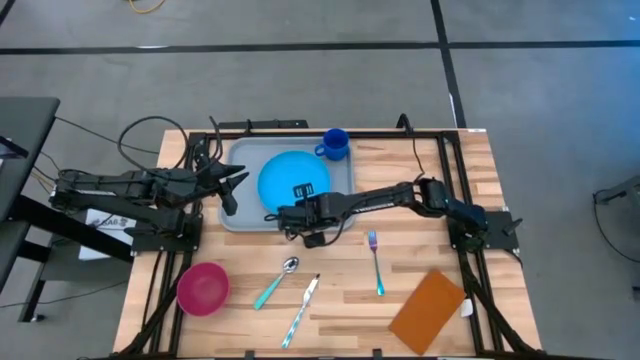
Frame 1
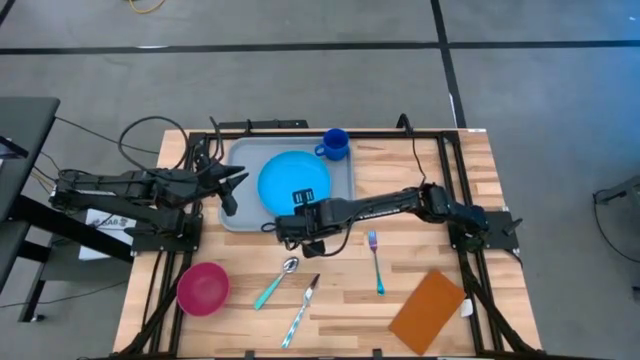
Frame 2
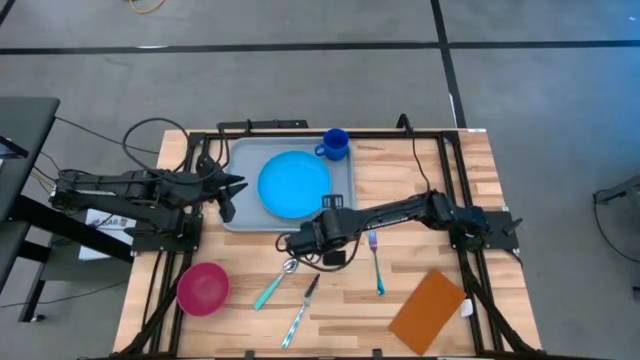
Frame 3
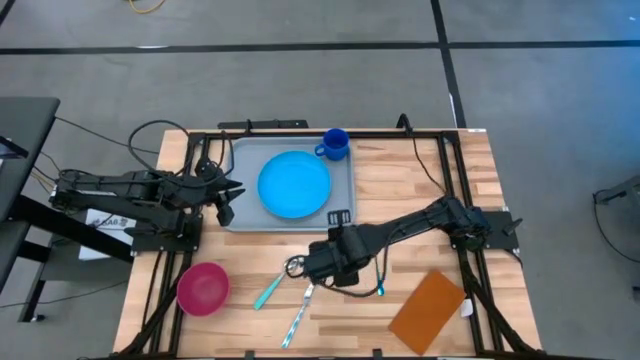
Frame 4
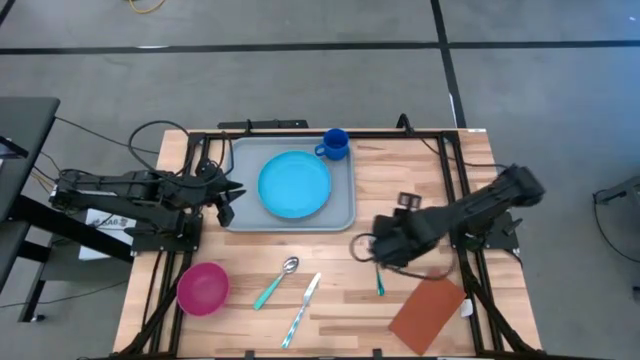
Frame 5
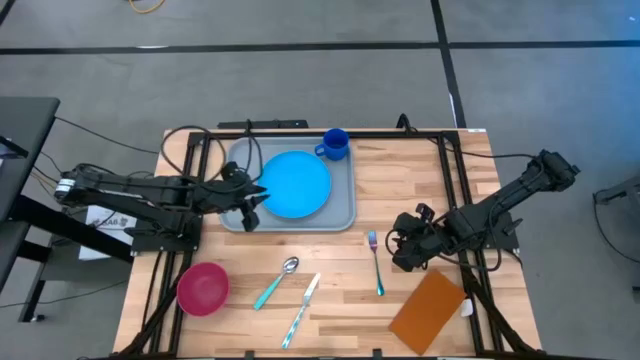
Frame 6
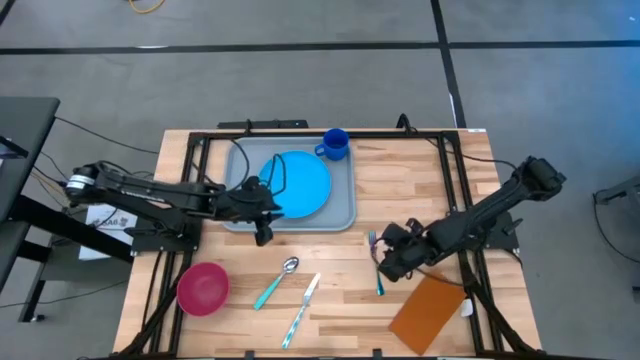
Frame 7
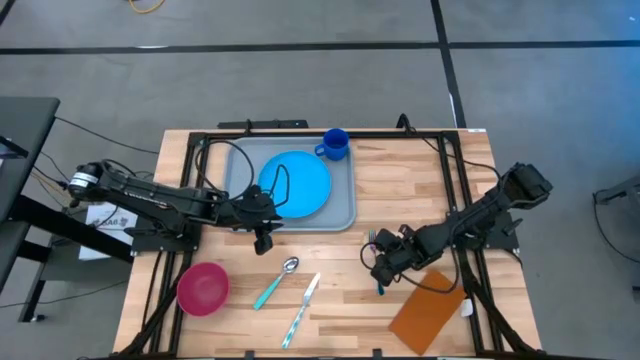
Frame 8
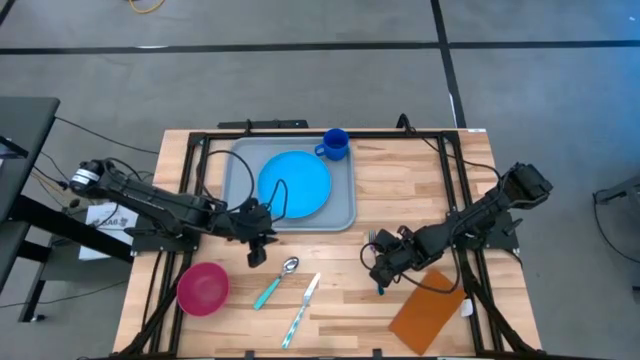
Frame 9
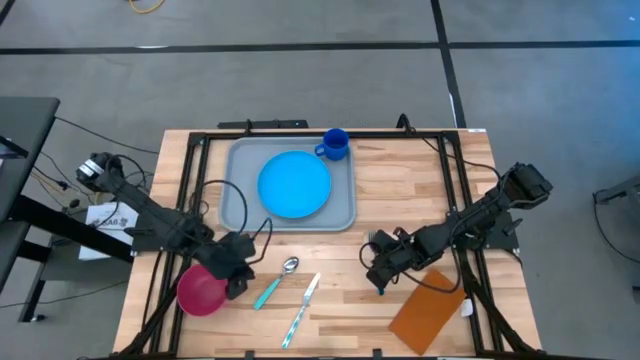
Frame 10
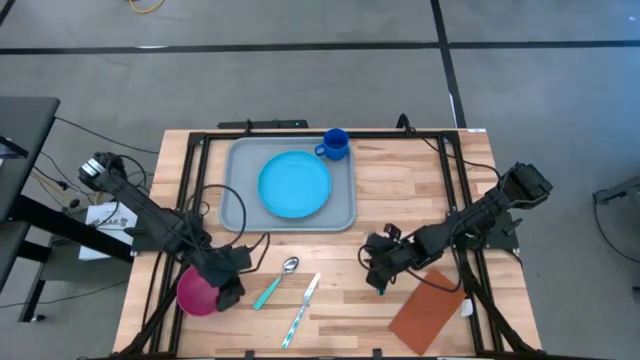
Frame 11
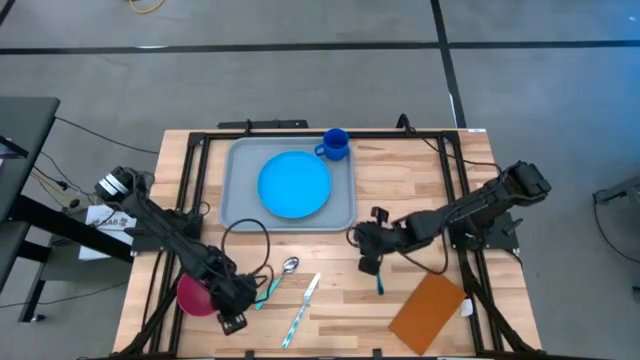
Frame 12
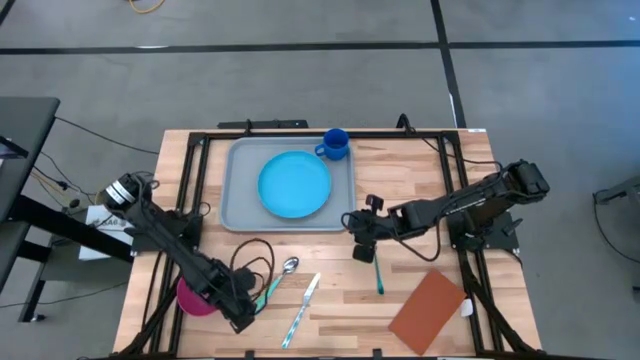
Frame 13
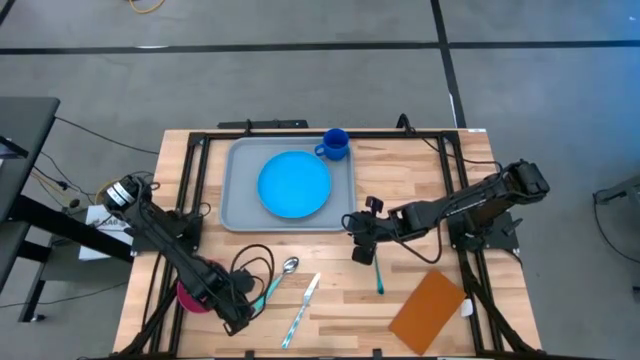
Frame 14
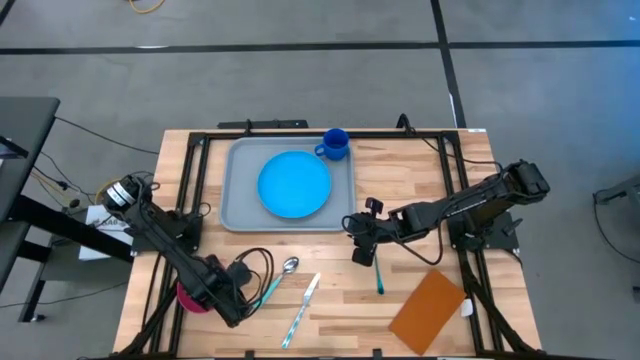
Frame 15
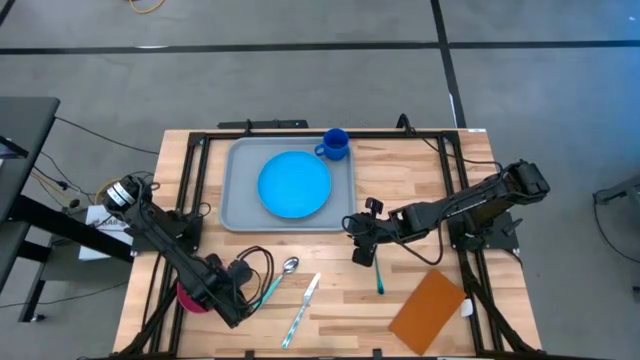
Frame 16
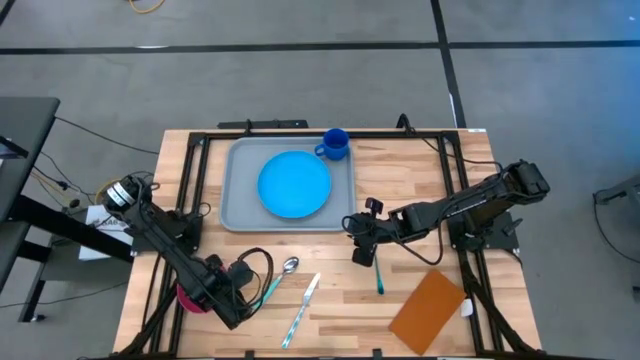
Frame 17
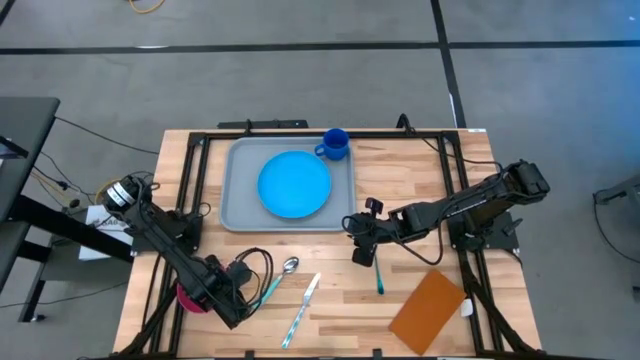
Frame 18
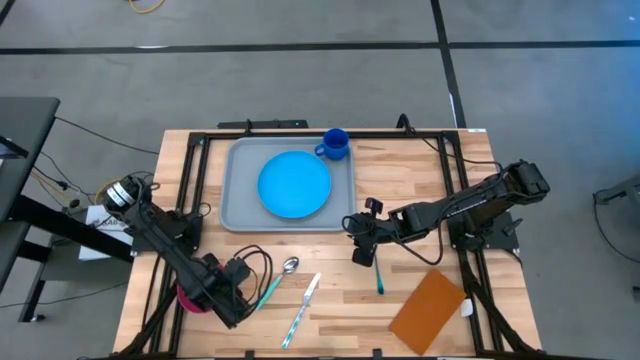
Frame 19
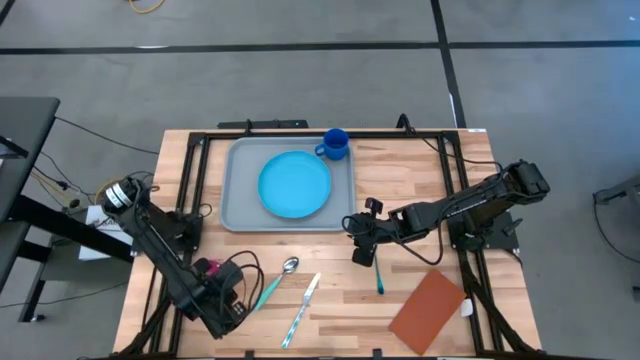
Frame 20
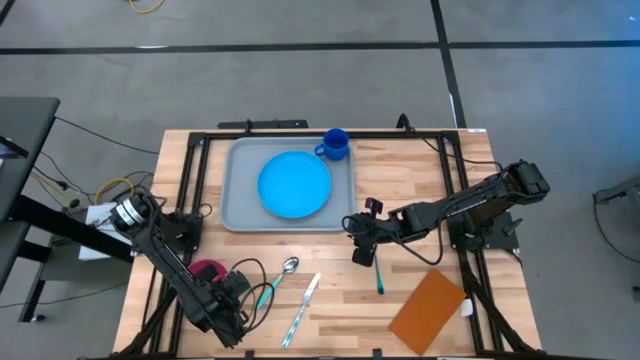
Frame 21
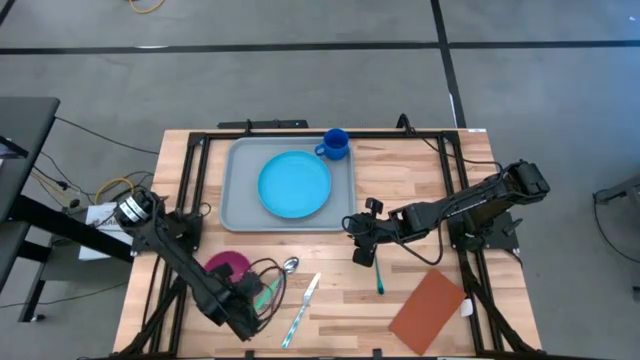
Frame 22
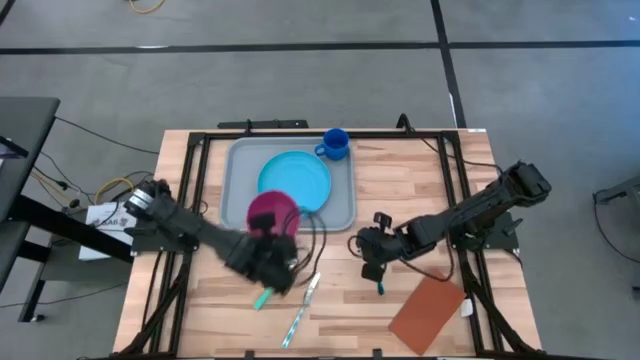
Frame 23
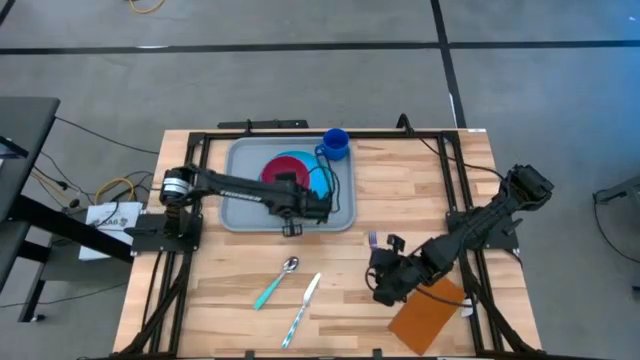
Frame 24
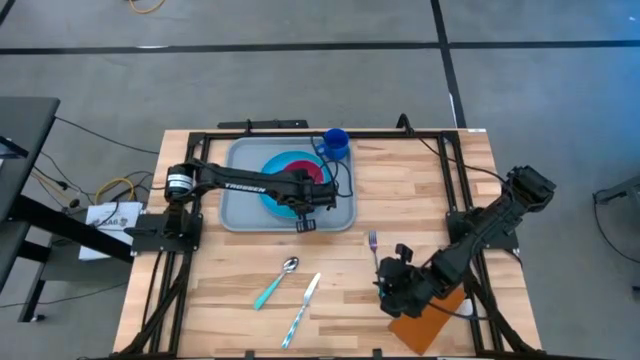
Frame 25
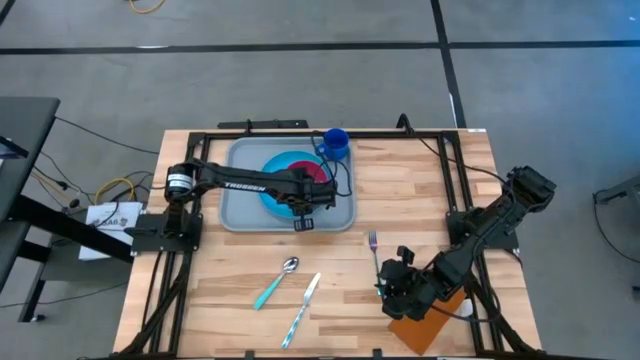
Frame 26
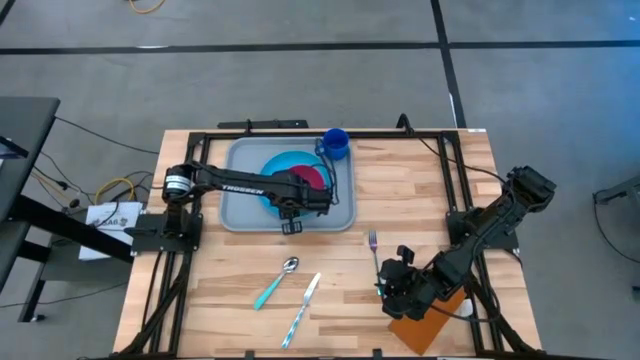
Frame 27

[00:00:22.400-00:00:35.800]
Task: Set up tray
Put the red bowl on the light blue plate on the gray tray

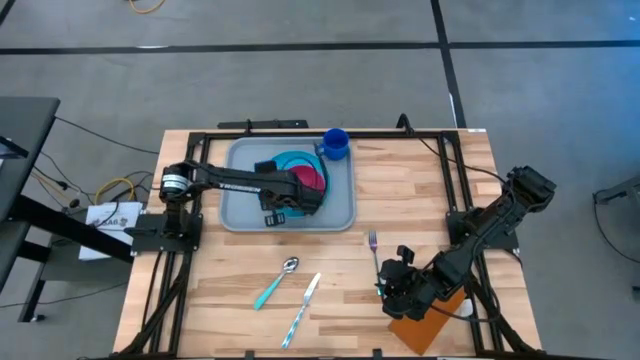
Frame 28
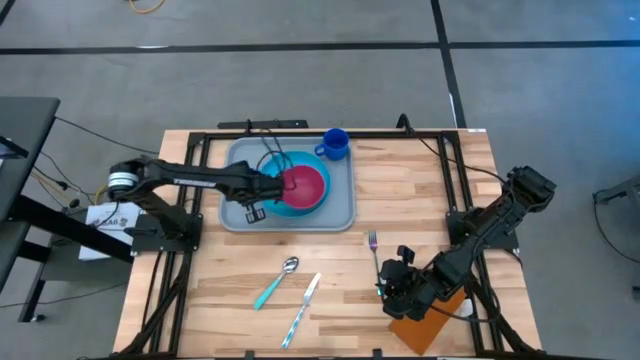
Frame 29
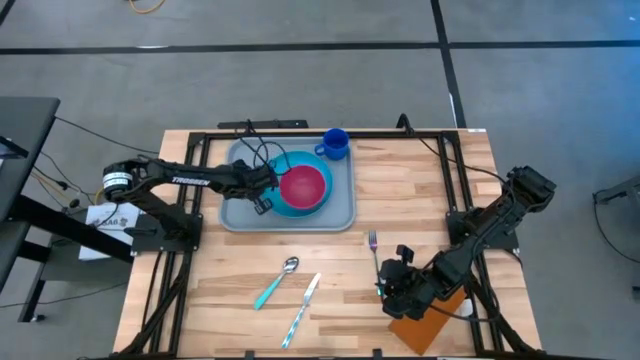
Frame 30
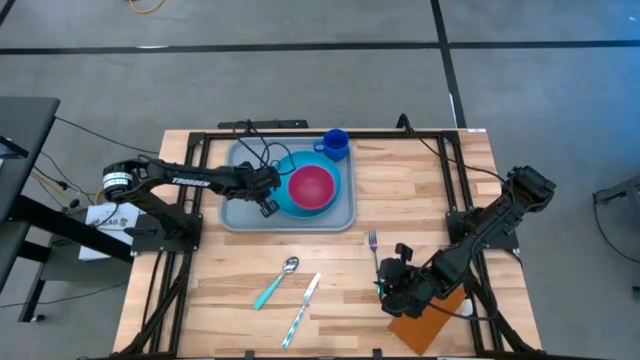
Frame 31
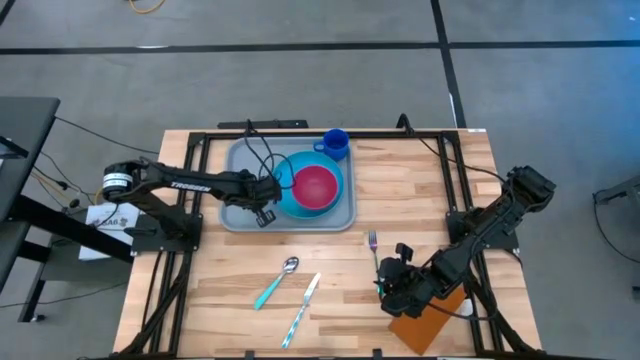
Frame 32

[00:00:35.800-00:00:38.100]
Adjust the light blue plate on the gray tray

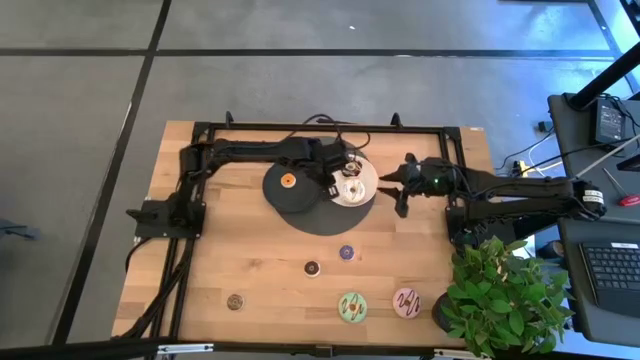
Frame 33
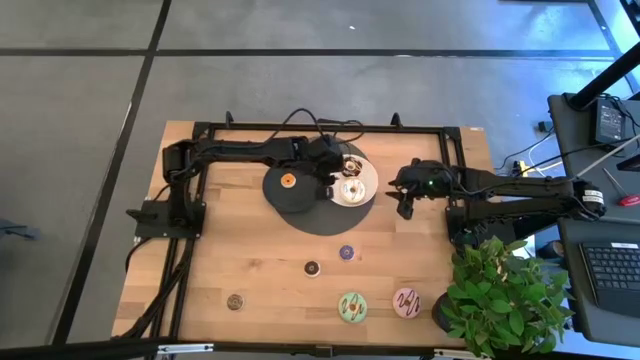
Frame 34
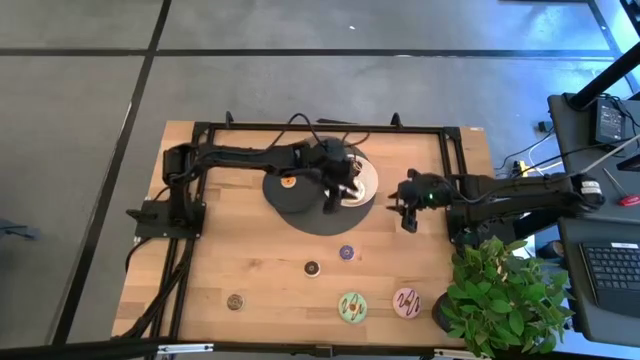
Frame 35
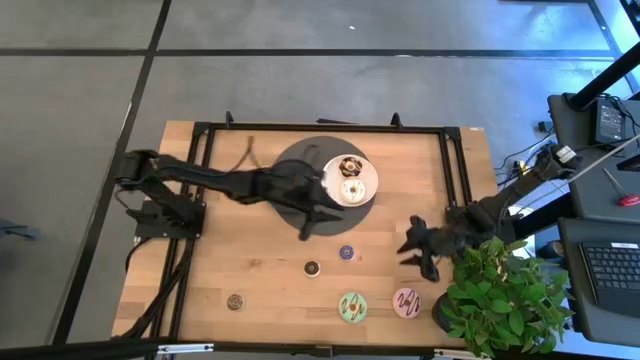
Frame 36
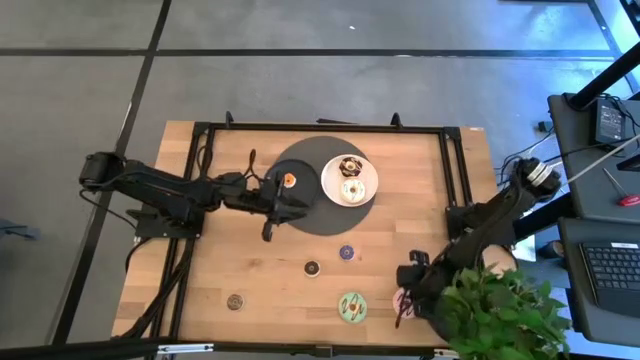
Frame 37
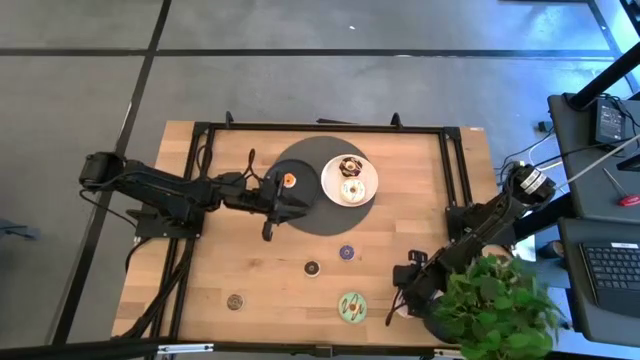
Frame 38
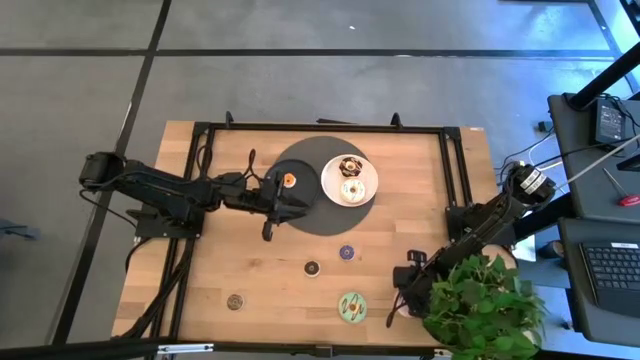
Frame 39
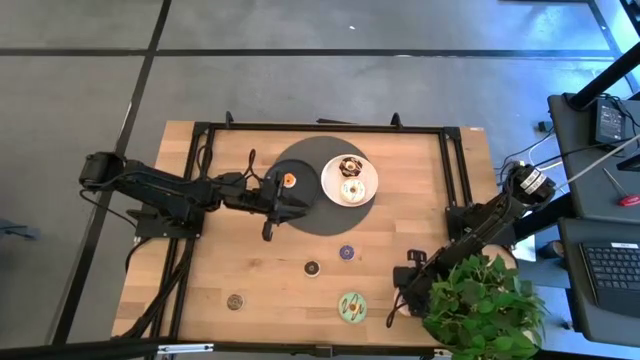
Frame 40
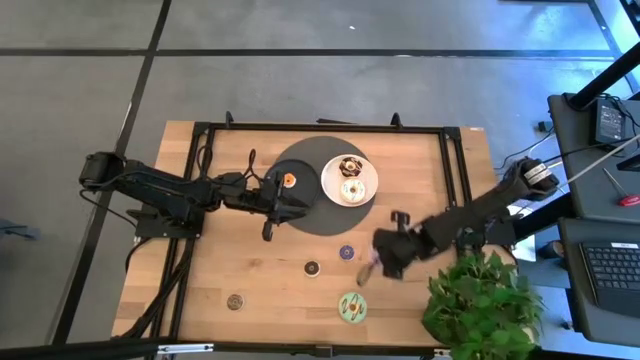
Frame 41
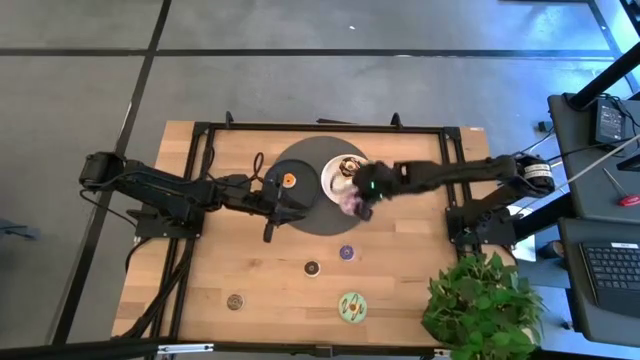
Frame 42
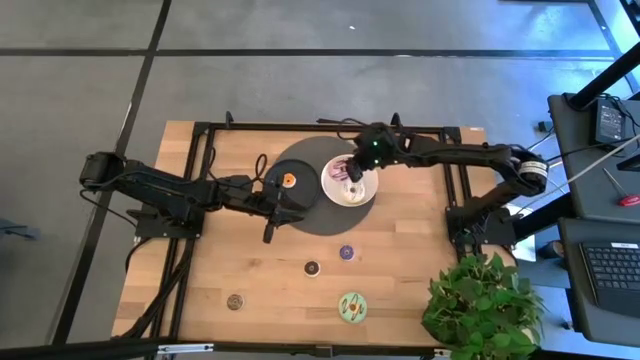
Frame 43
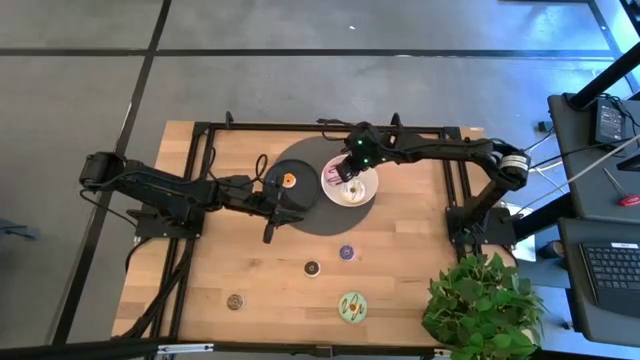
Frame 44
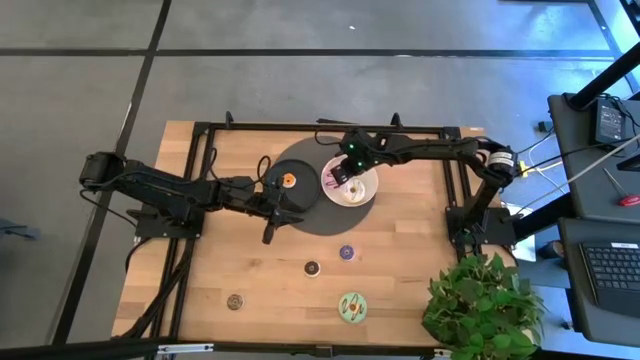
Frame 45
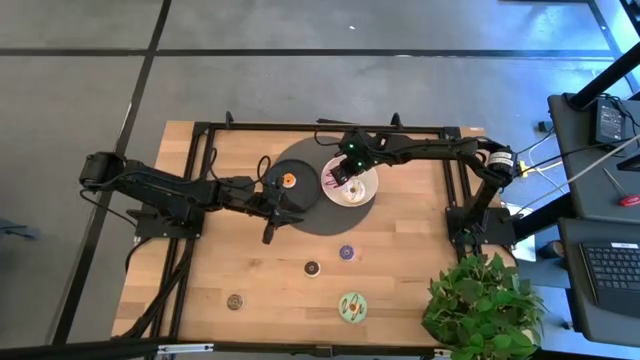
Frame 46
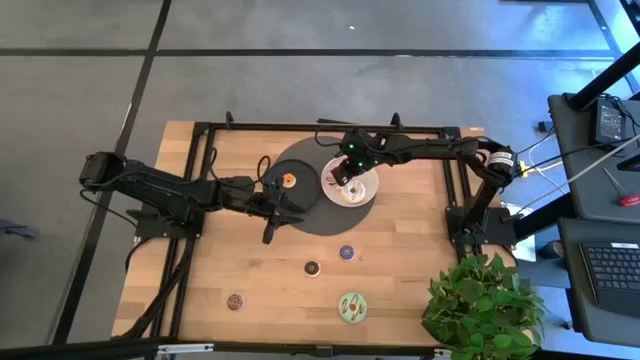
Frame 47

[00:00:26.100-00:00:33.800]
Task: Pick & Place donuts
Put the big purple donut on the white plate
